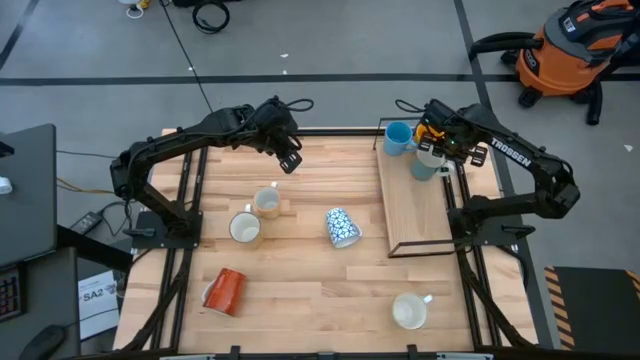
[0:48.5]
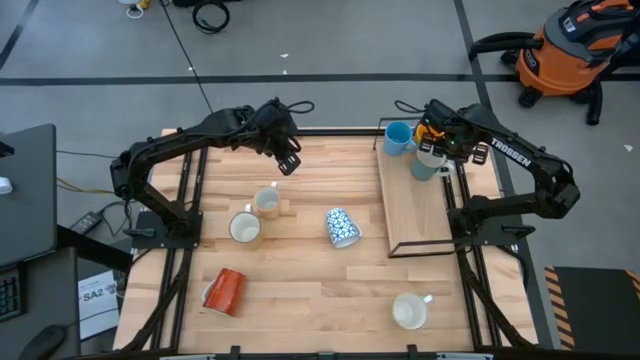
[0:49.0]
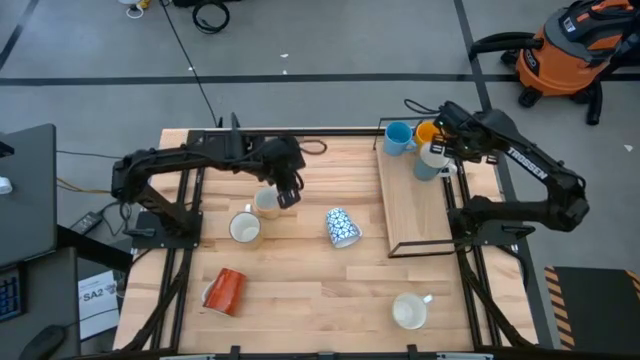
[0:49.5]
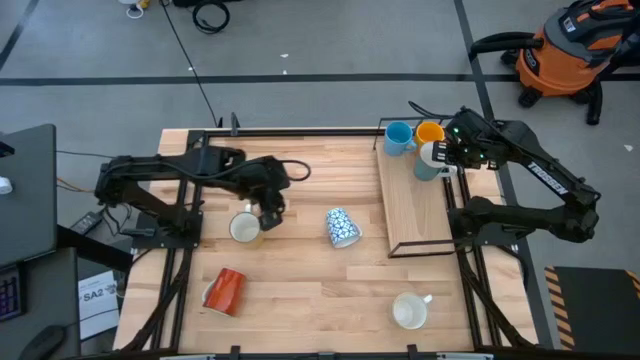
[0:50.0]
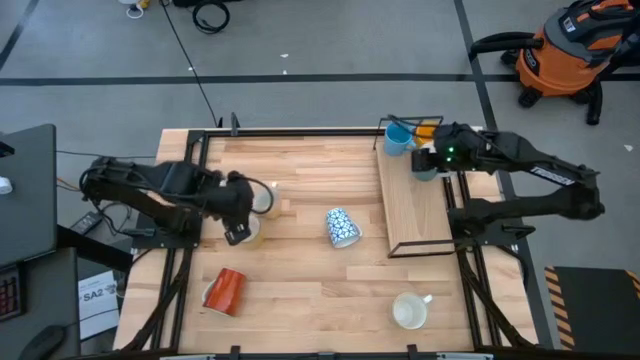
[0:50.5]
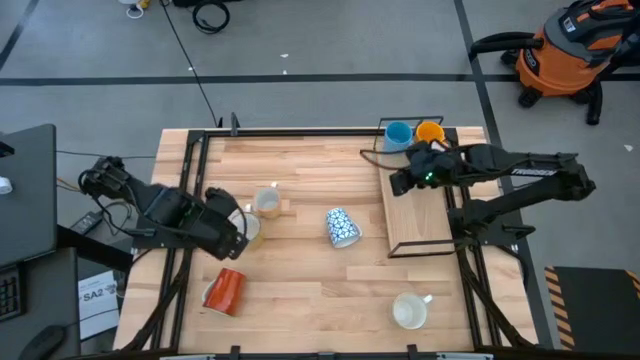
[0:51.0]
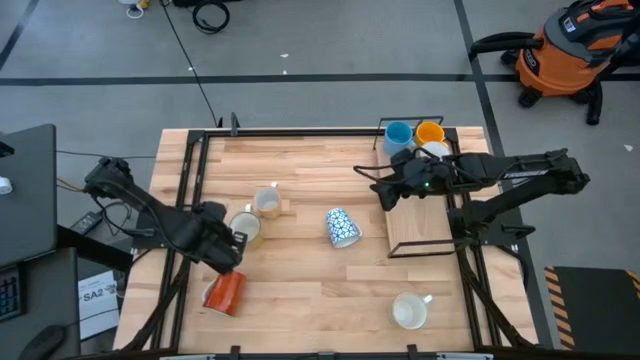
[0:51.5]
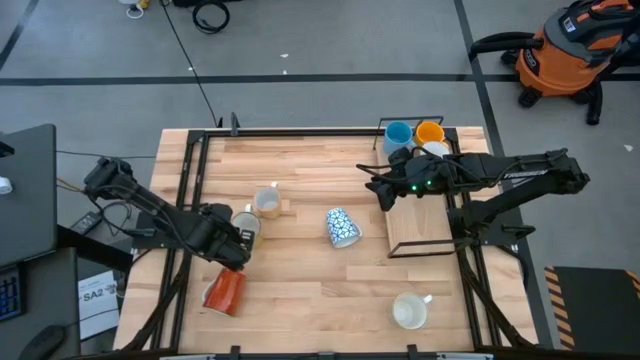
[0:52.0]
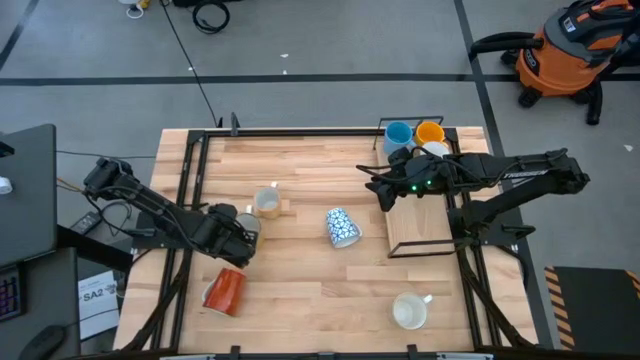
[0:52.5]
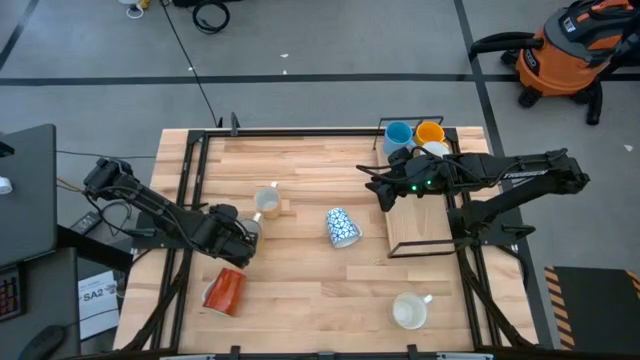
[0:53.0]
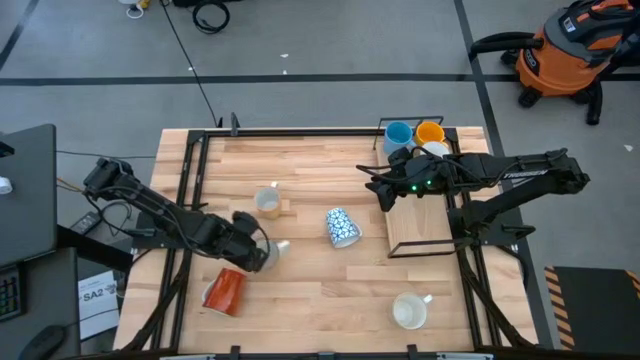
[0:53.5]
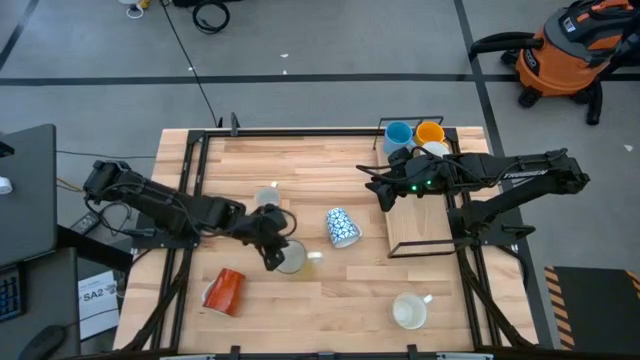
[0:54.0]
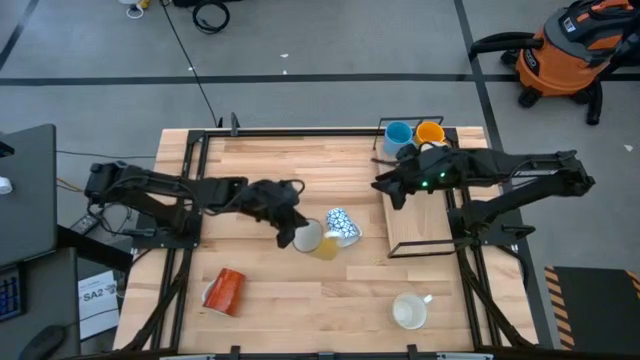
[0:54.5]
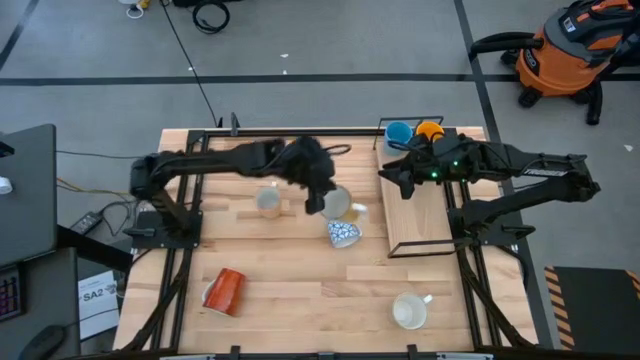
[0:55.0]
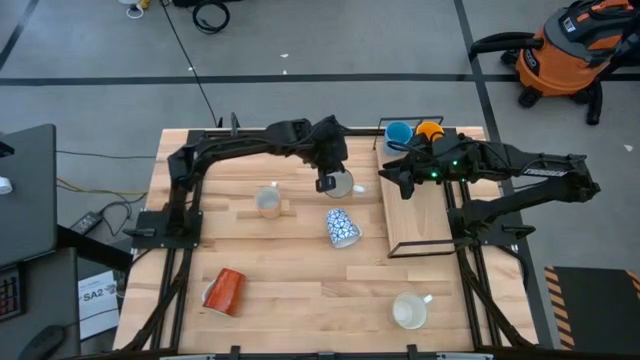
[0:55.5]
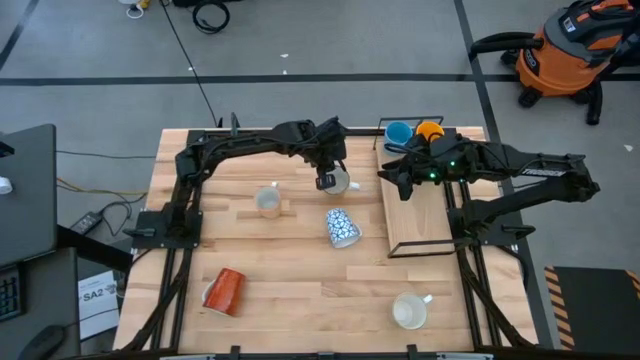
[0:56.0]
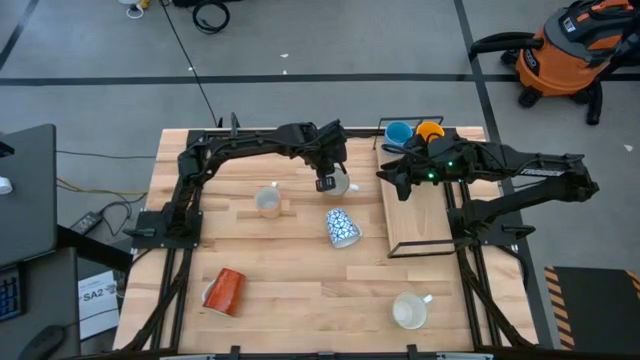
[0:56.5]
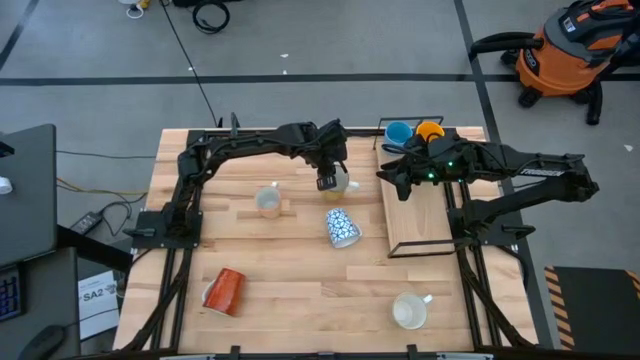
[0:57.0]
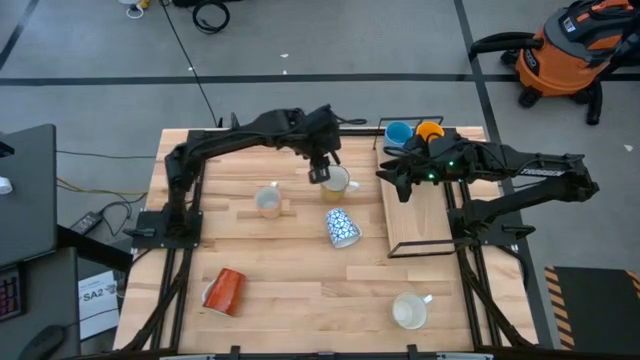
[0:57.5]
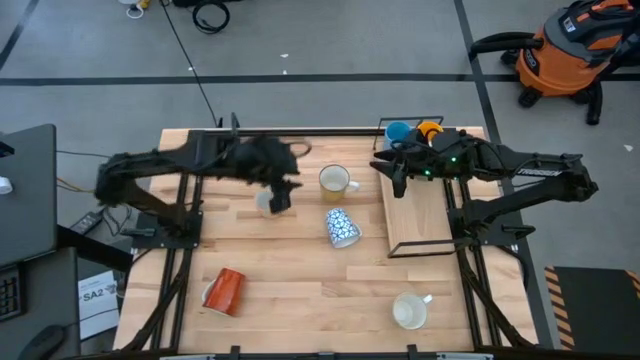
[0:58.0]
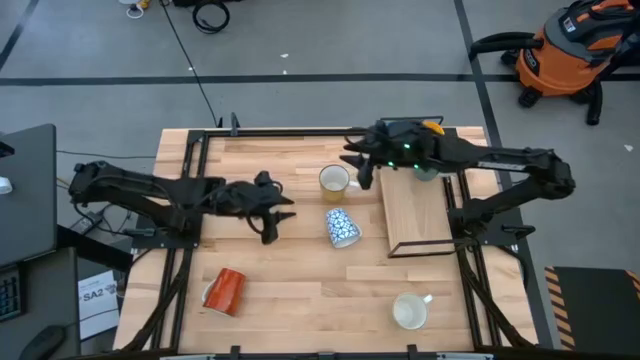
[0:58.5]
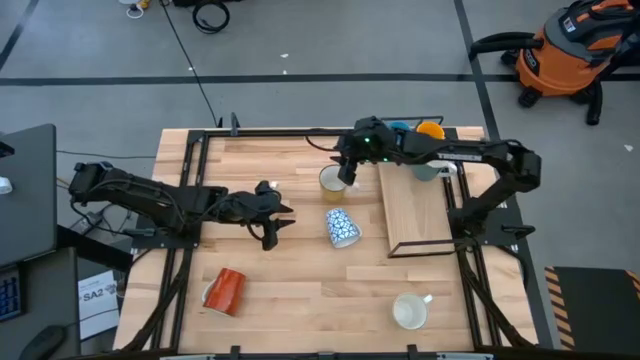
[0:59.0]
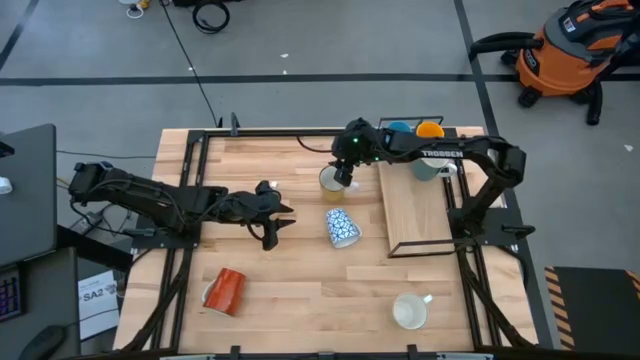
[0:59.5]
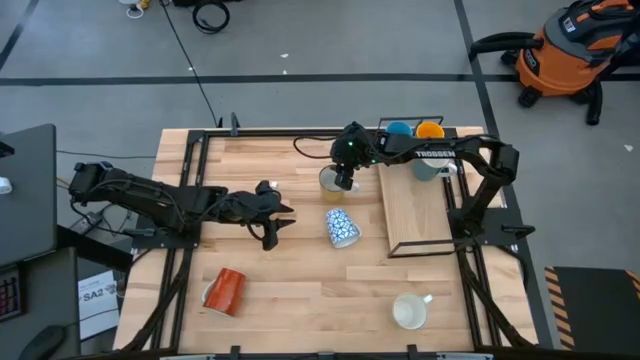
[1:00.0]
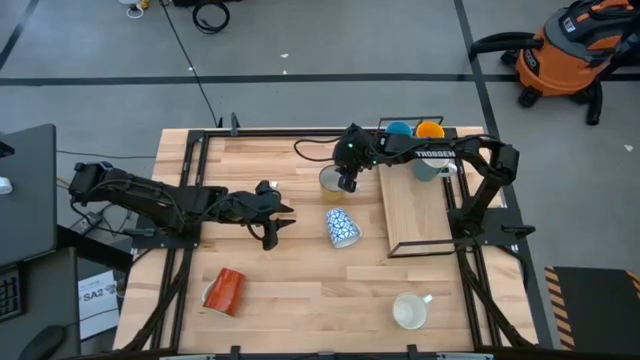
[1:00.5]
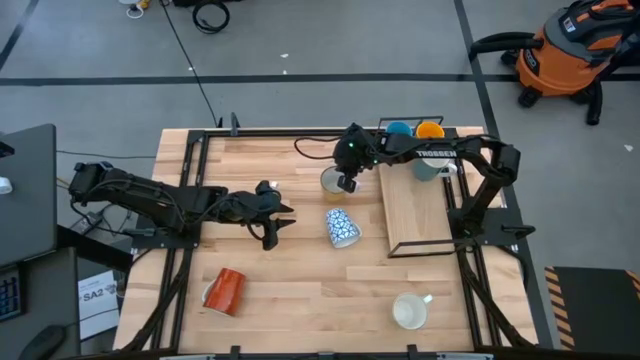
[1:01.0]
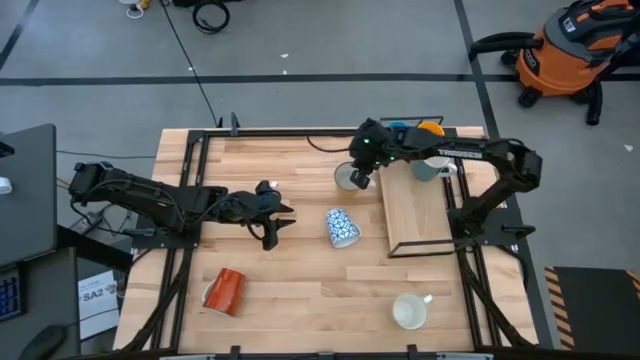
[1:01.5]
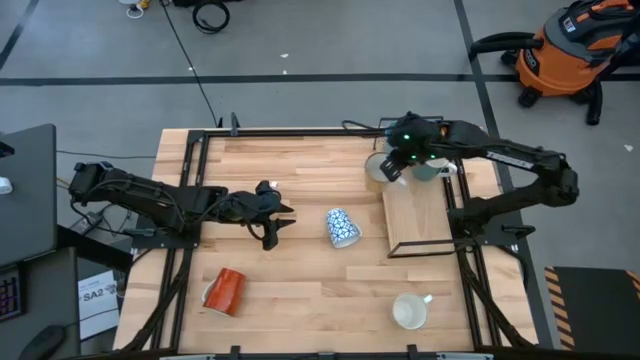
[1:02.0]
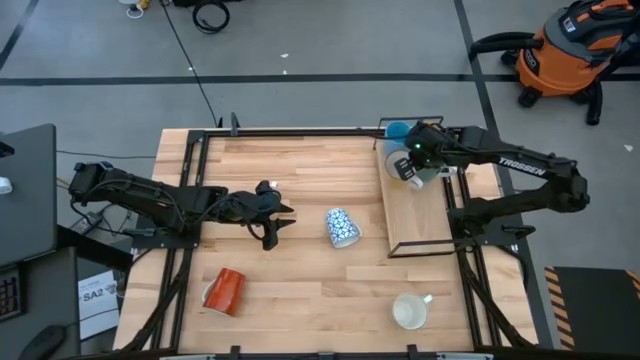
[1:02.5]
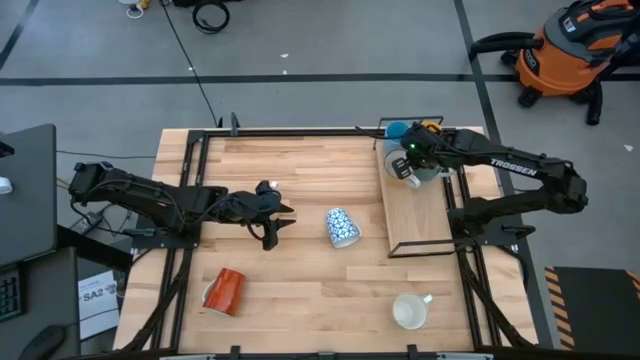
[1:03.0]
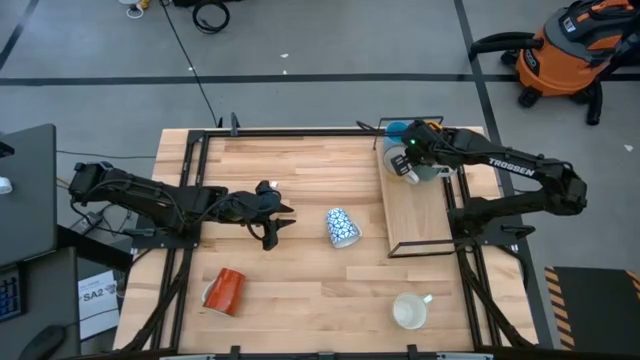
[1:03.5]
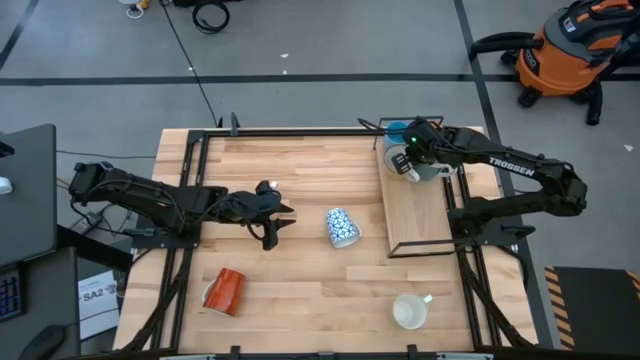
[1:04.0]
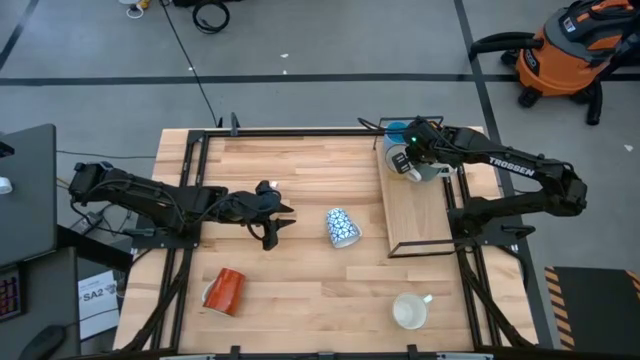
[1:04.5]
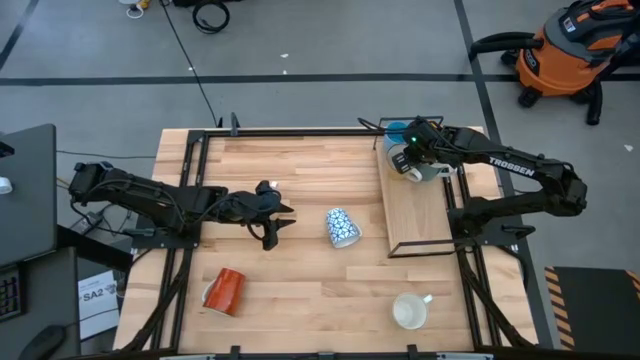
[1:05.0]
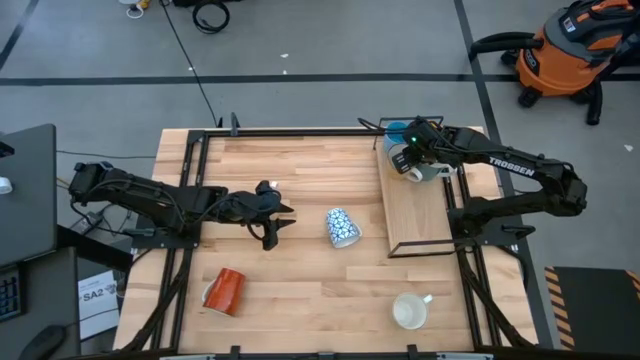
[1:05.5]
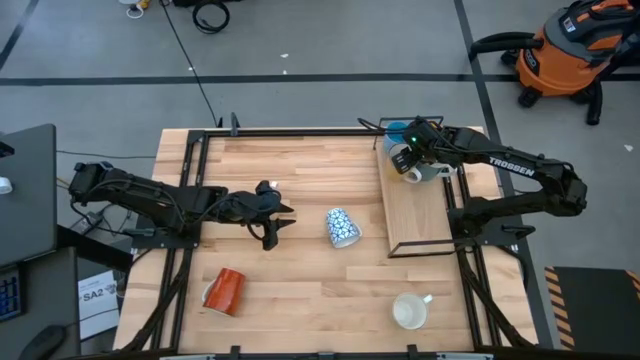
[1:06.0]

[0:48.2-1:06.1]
Task: Place coffee mugs
Put the yellow white mug on the shelf

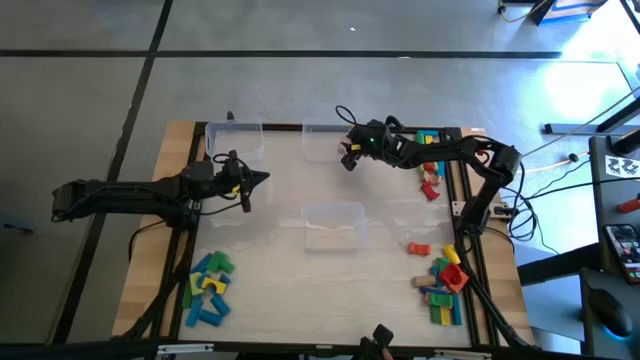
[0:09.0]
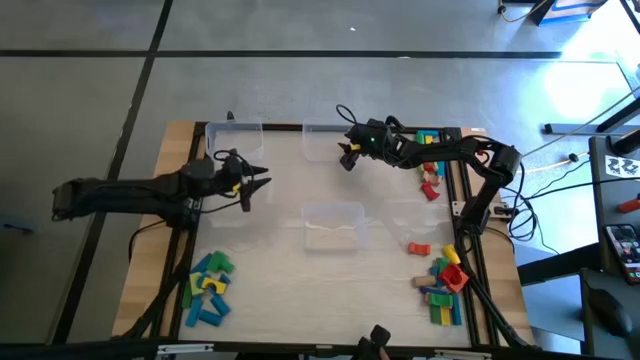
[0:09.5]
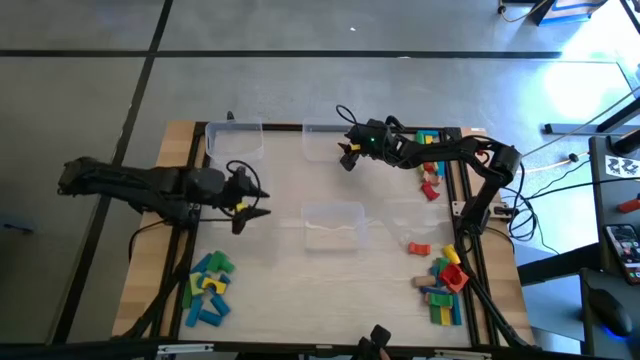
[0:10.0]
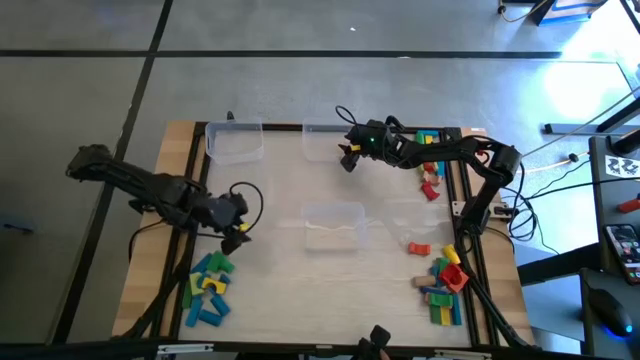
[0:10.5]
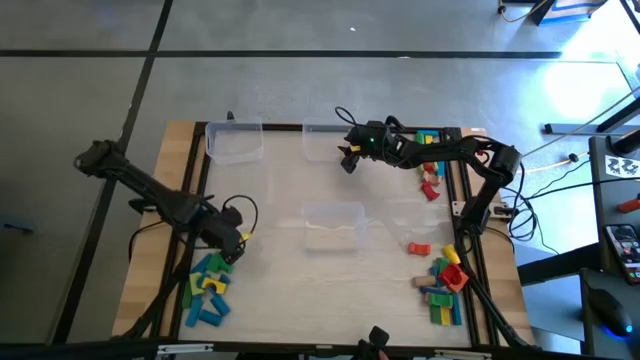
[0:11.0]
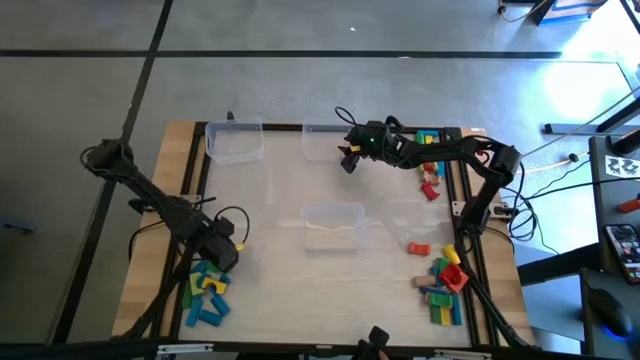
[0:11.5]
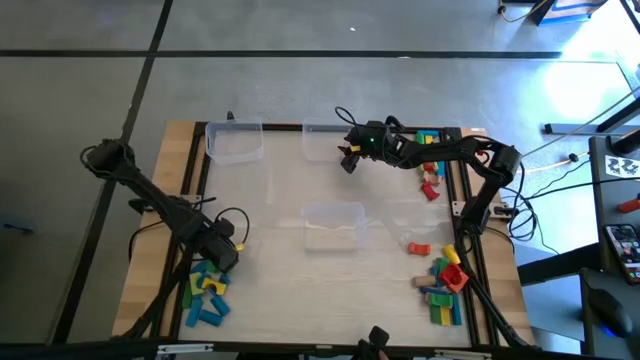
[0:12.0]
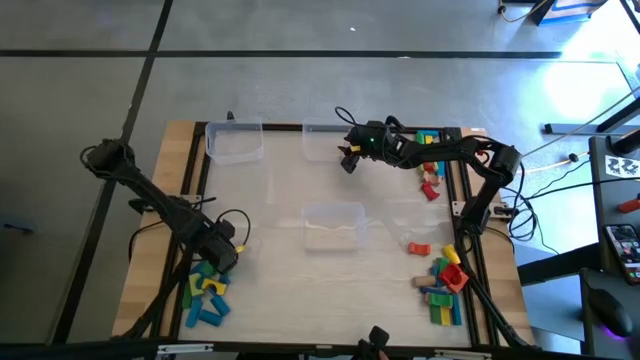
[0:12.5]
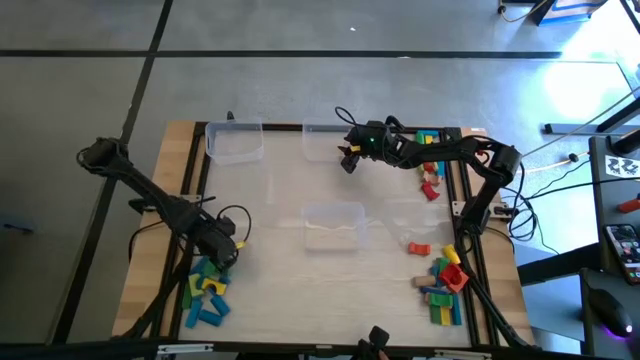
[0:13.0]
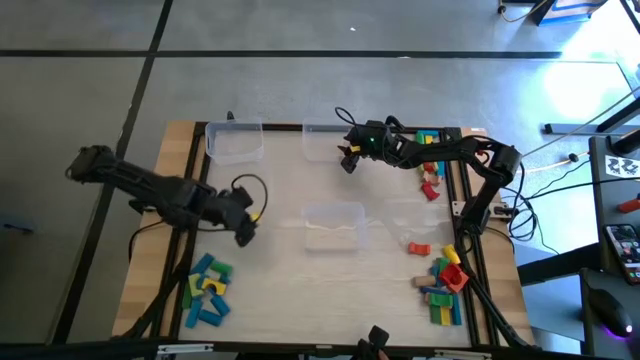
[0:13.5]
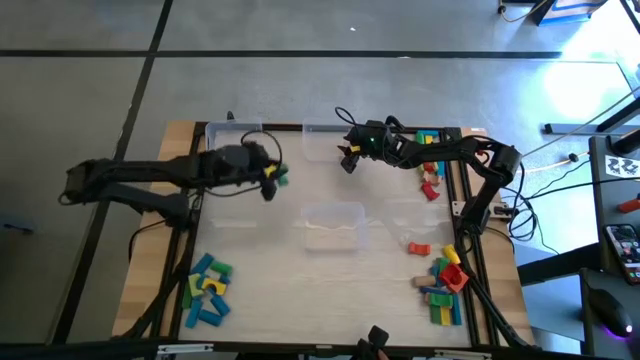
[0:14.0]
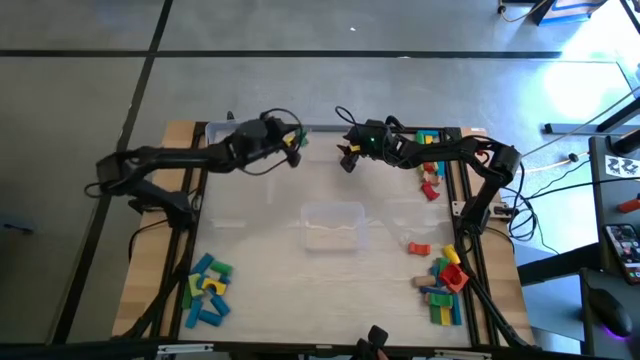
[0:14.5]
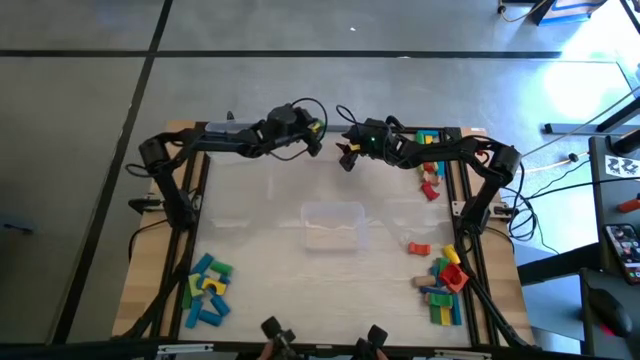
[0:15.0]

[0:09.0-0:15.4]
Task: Sort blocks by size
Put the green arch block into the top right transparent bin
